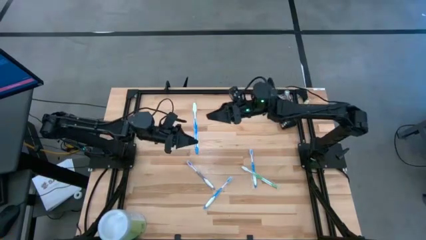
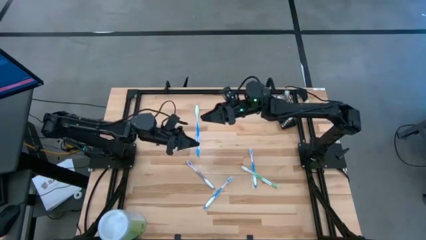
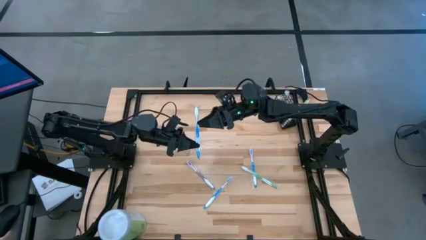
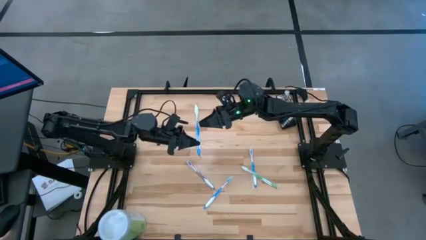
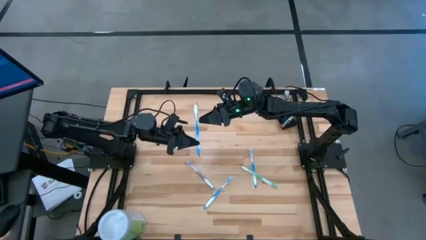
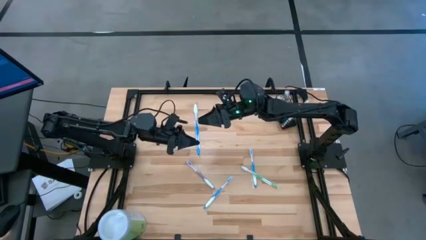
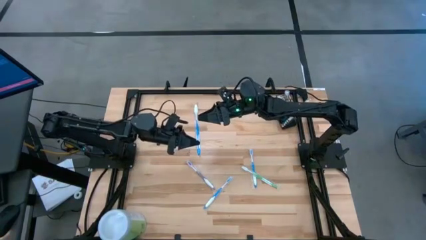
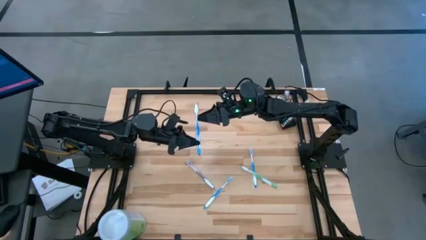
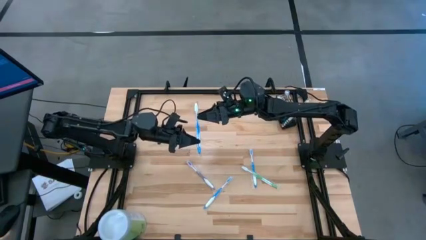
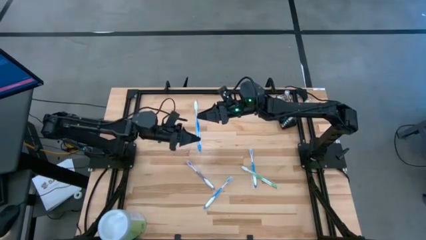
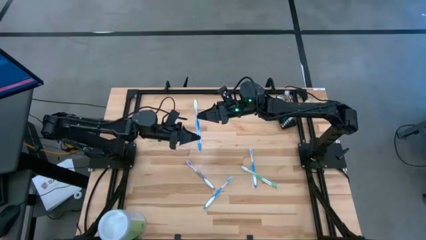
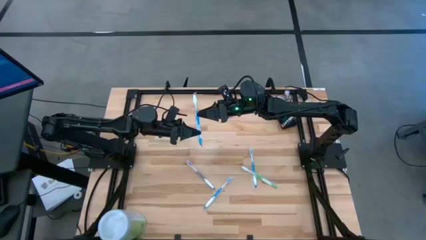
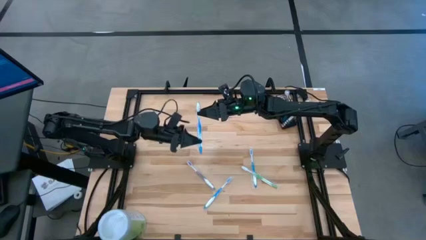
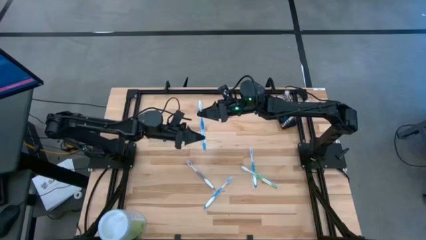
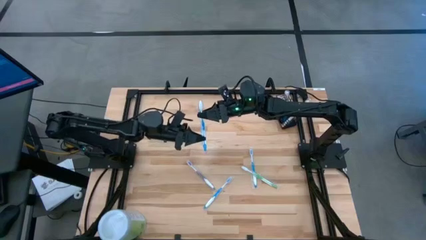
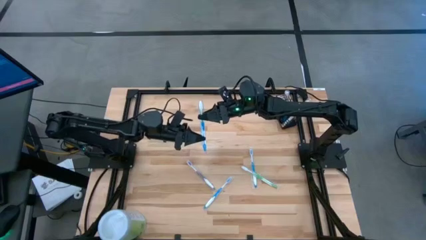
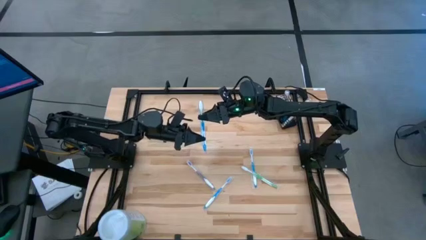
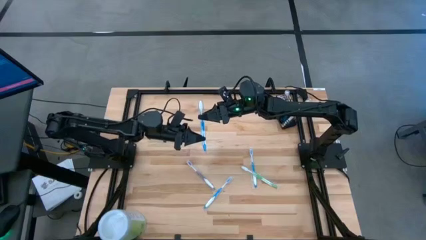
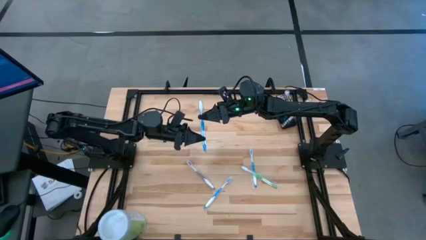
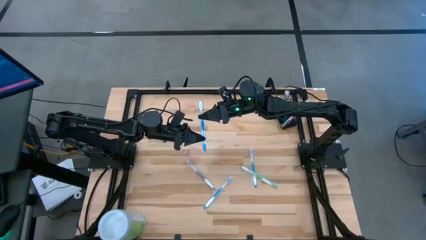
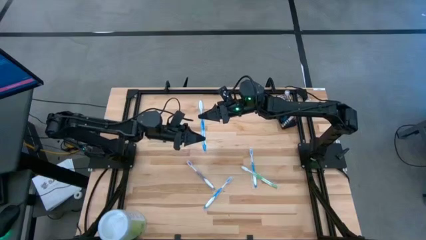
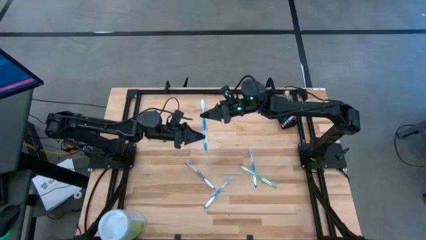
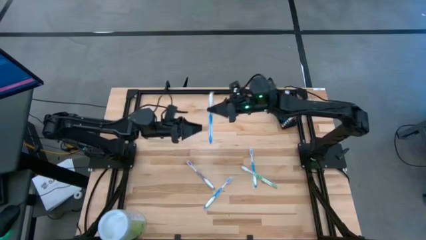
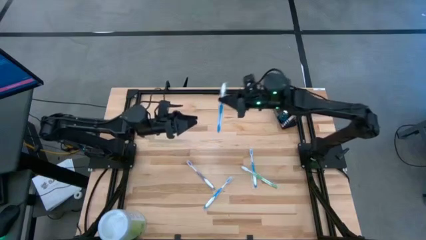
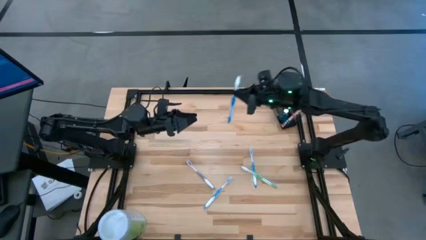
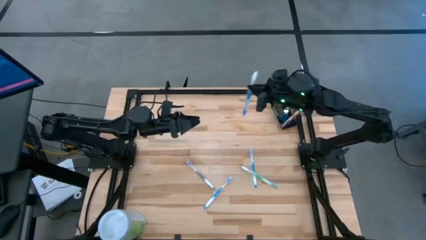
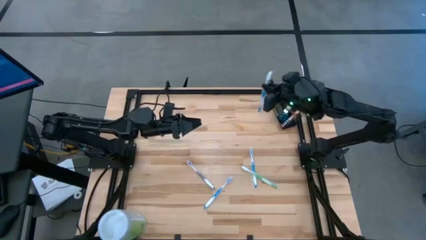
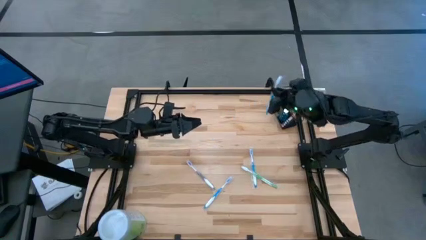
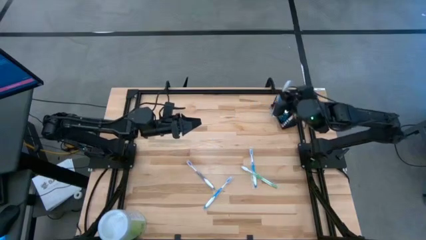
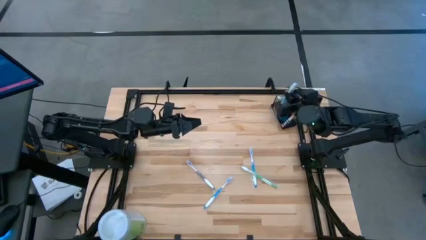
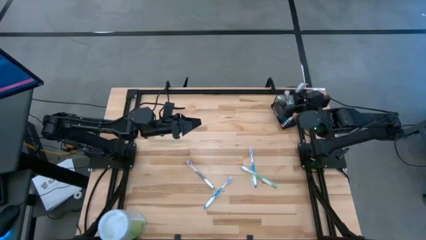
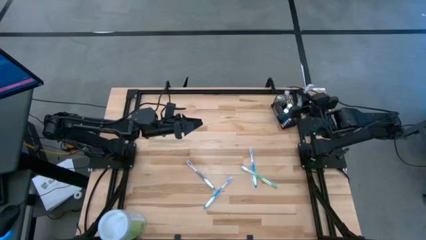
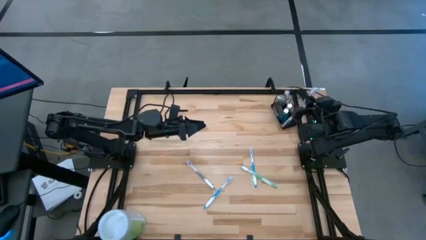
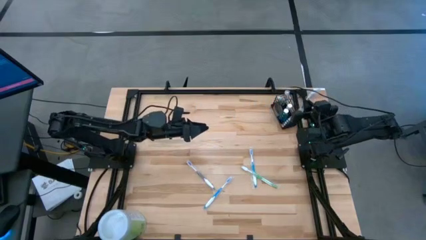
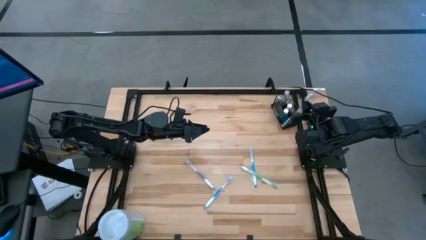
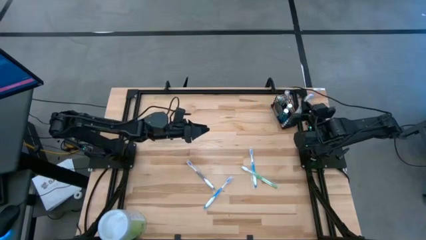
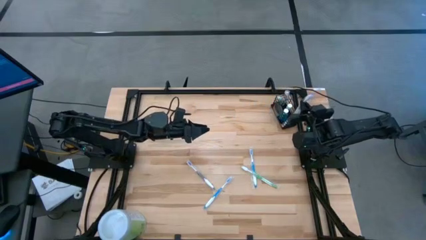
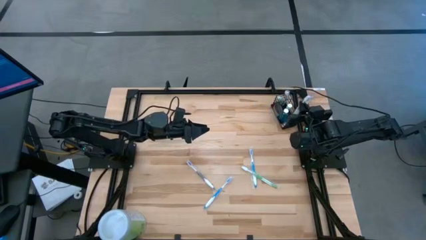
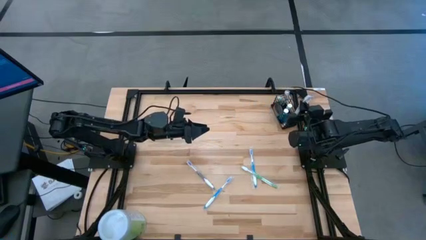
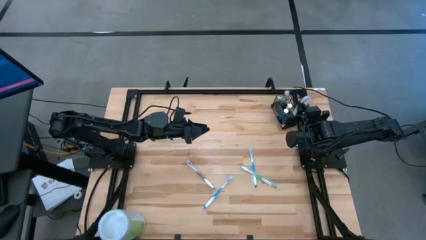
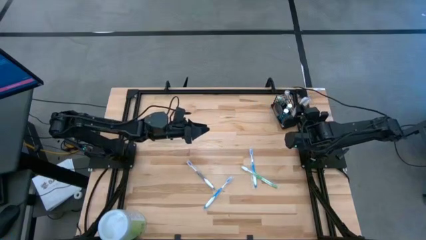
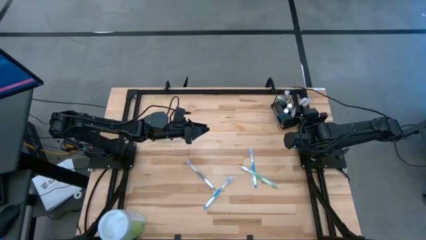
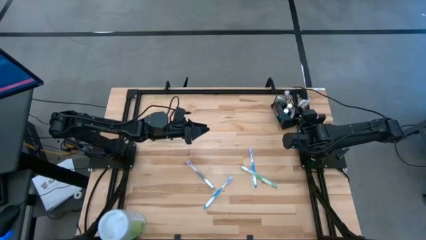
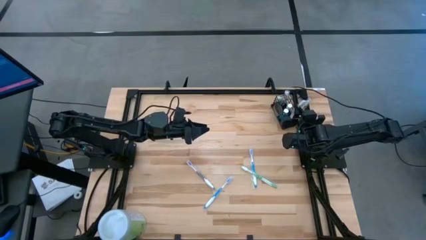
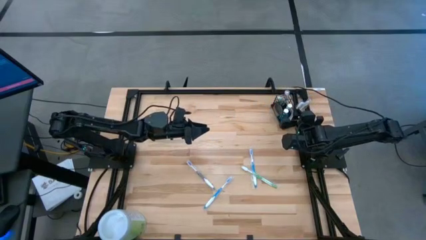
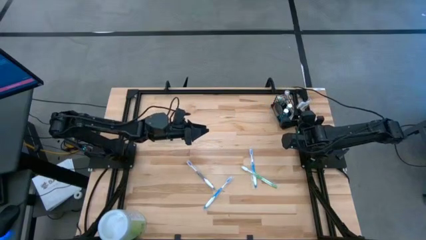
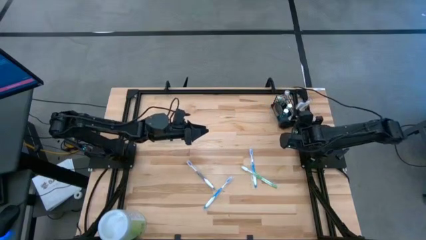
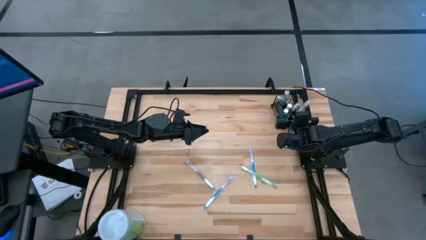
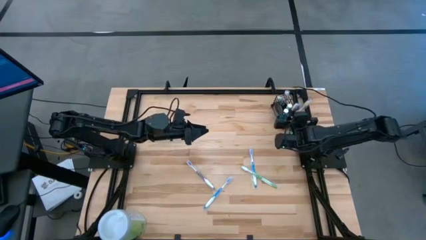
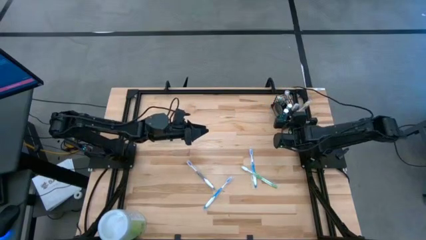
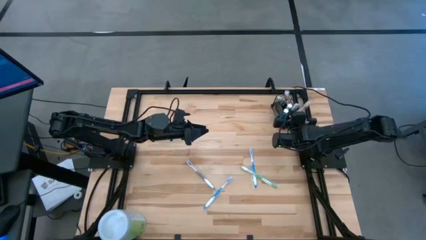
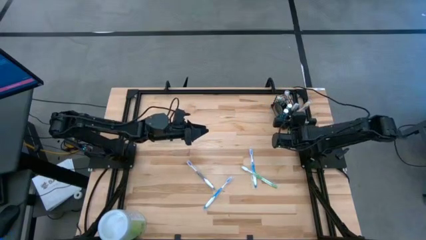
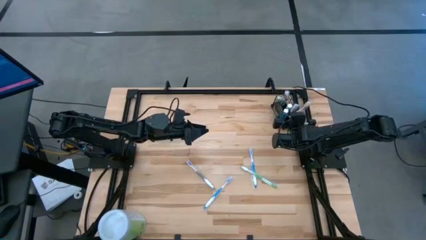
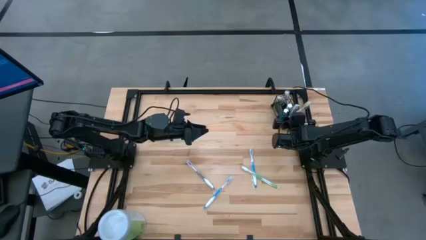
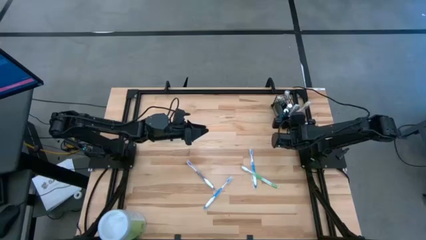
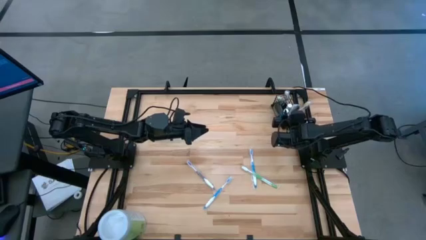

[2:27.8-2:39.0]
Task: Pick & Place toothbrushing station
Put the left blue toothbrush in the right section of wire organizer

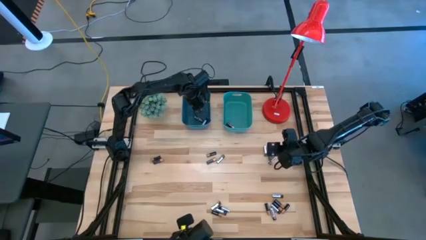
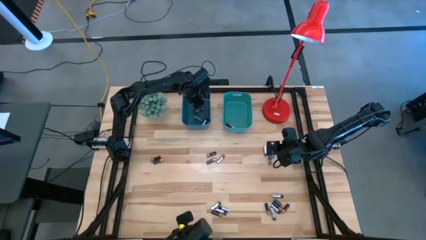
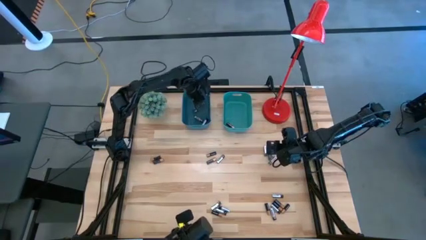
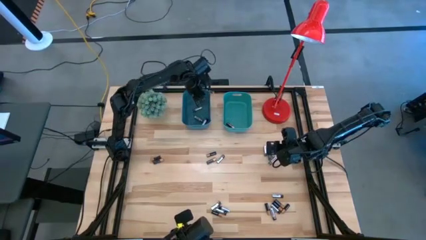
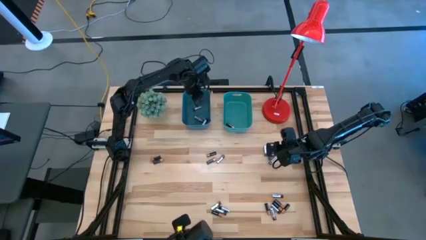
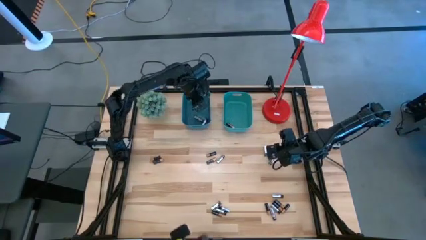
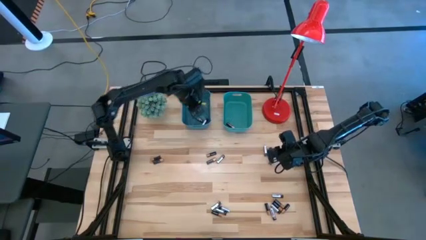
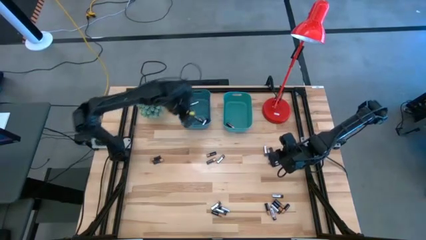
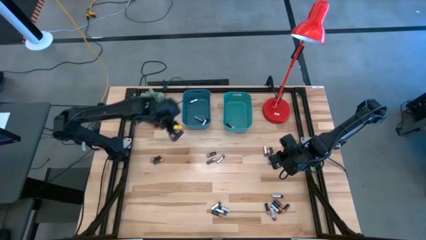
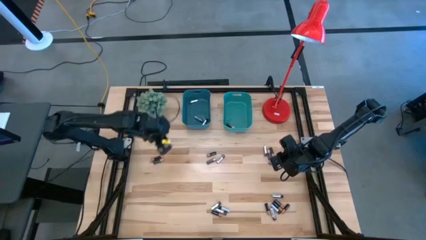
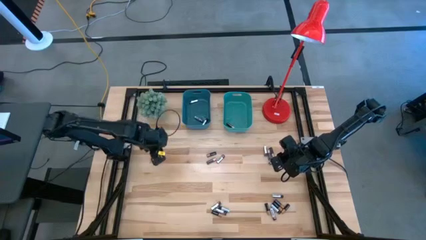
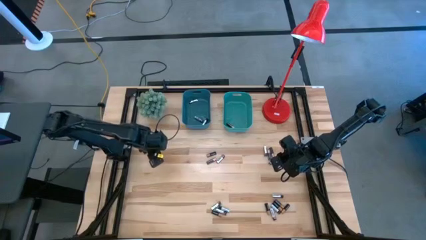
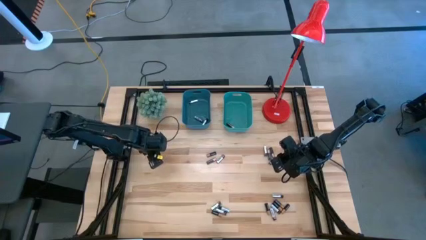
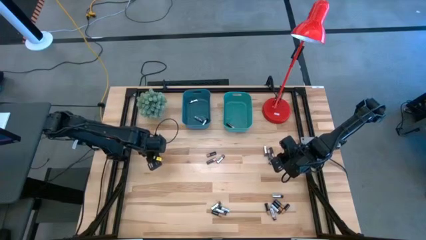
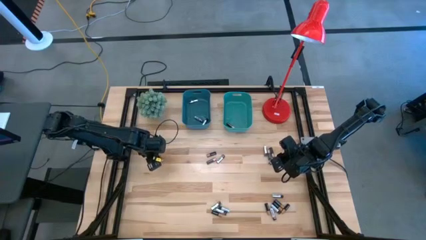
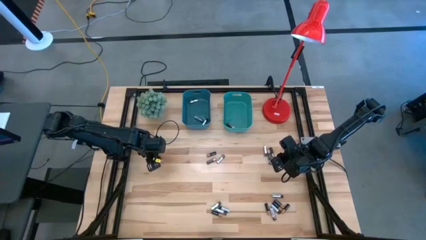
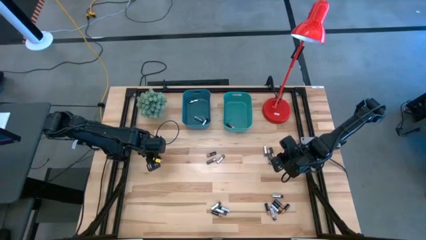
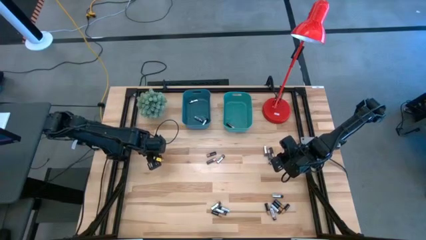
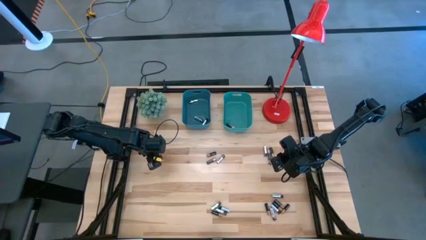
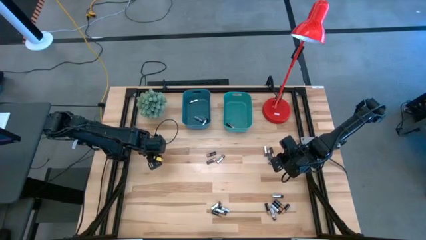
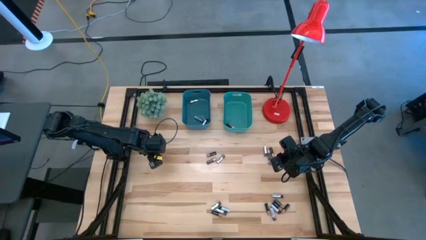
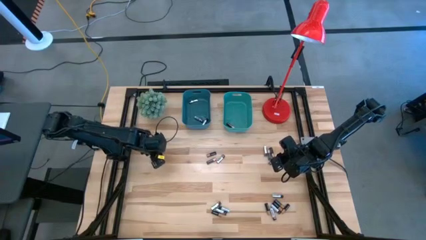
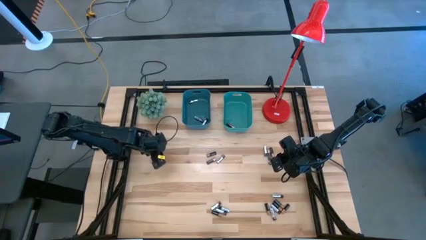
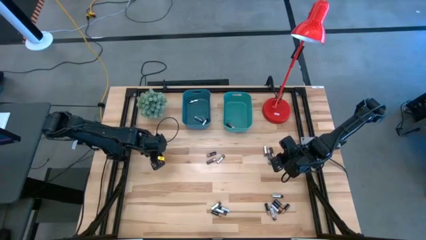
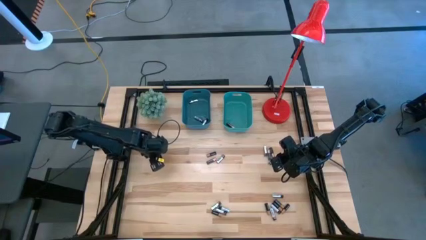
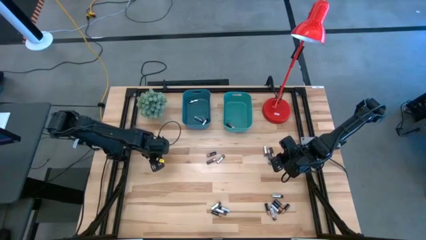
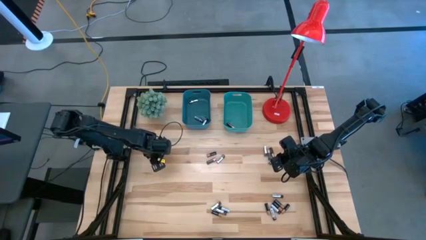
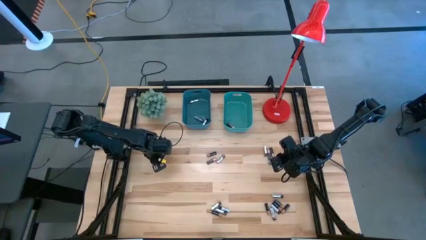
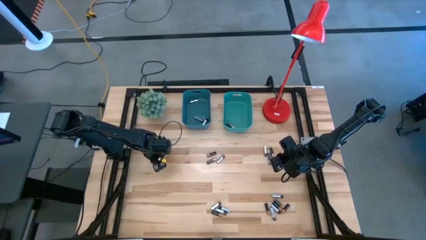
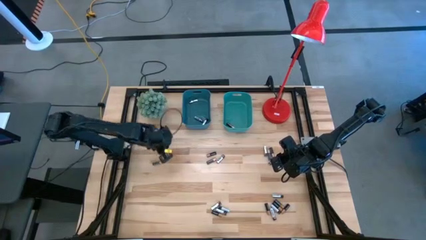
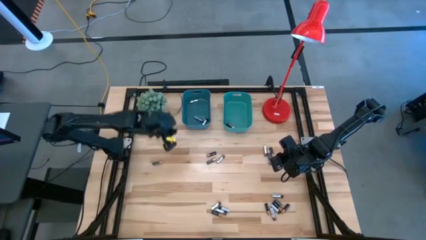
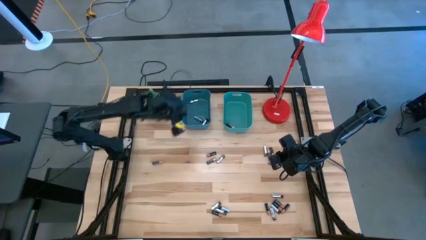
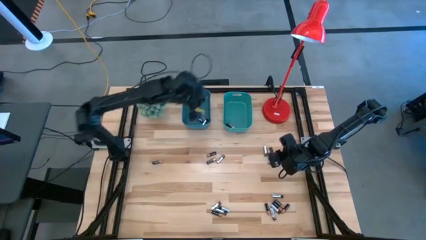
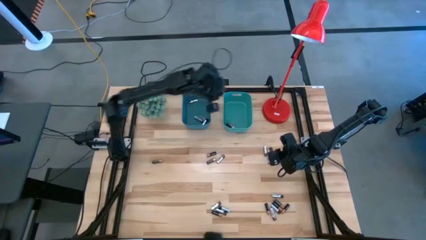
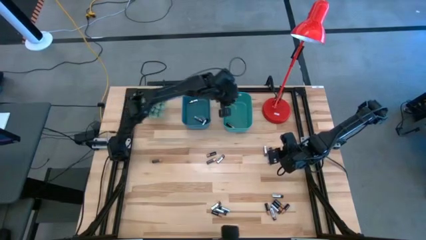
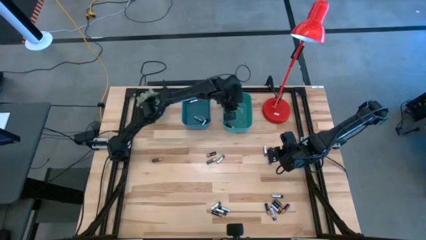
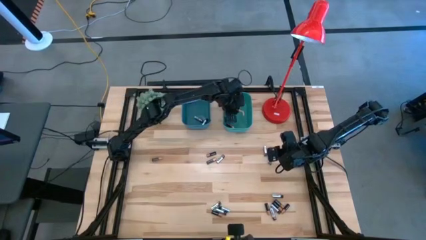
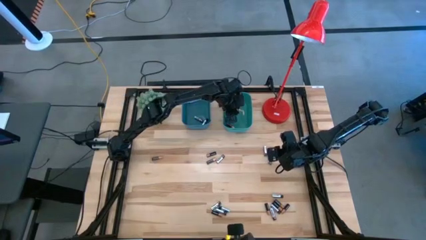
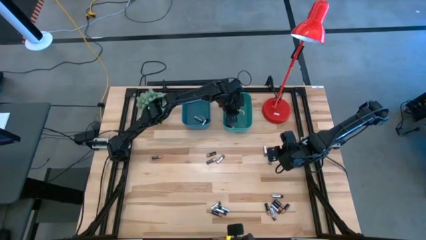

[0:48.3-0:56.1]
Task: Sort batteries
Put the black battery into the green bin
